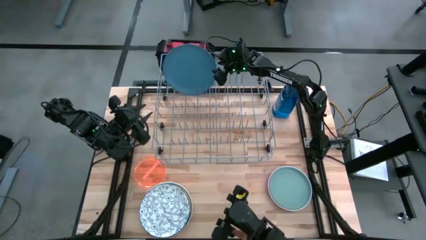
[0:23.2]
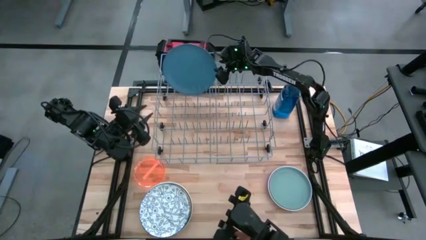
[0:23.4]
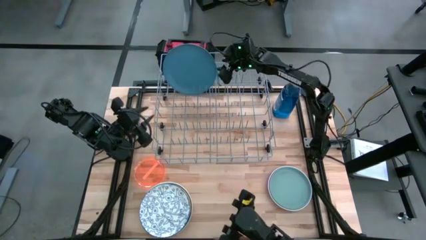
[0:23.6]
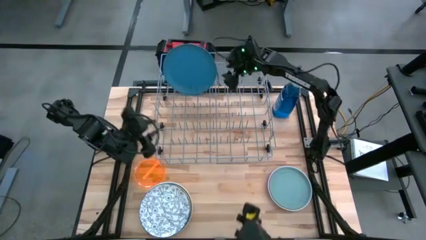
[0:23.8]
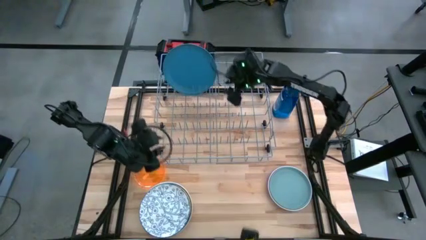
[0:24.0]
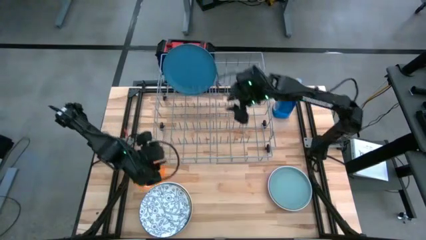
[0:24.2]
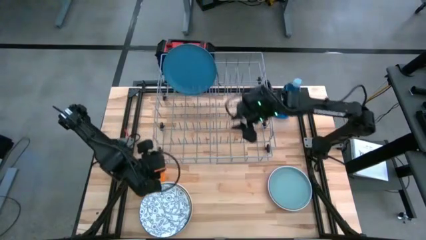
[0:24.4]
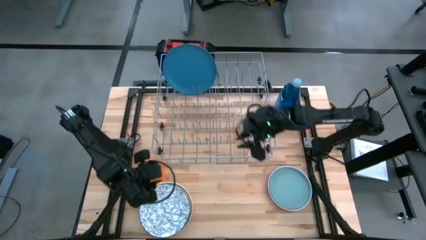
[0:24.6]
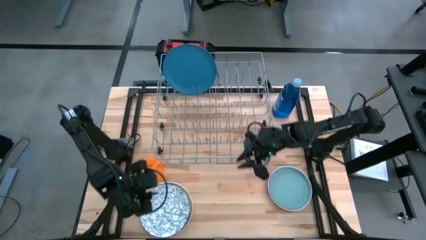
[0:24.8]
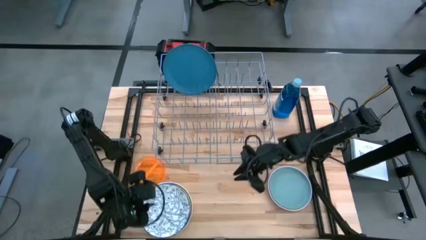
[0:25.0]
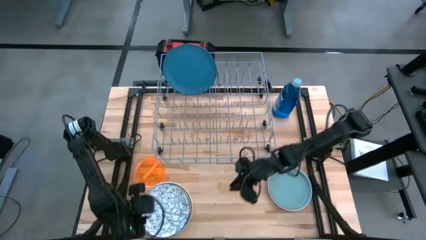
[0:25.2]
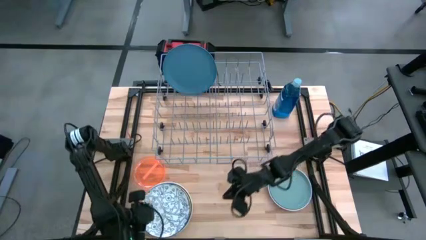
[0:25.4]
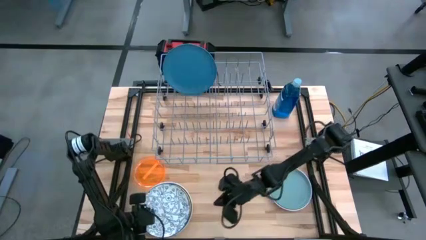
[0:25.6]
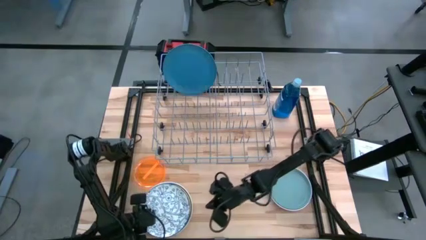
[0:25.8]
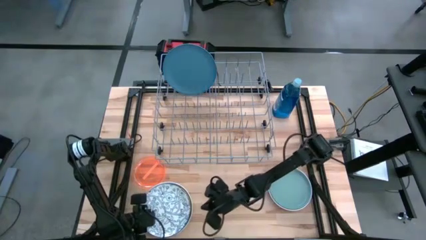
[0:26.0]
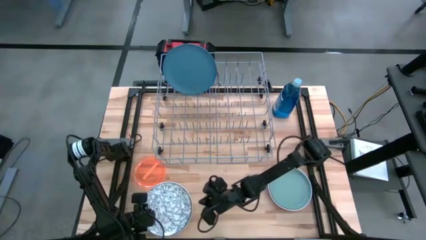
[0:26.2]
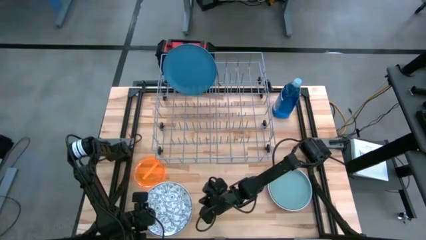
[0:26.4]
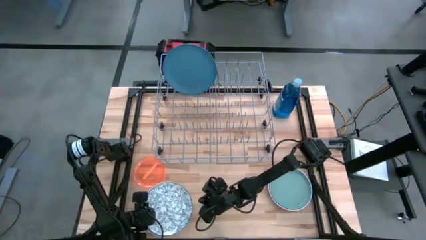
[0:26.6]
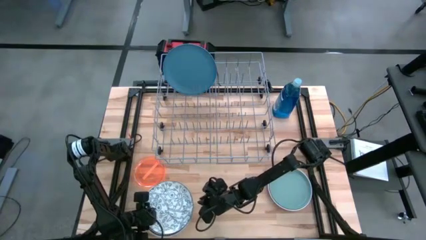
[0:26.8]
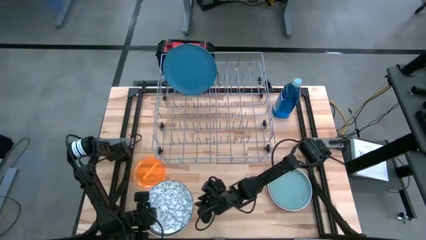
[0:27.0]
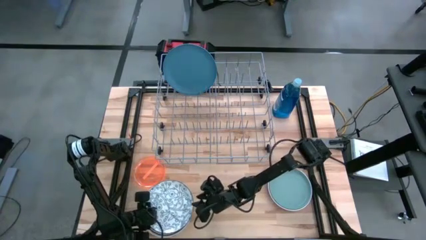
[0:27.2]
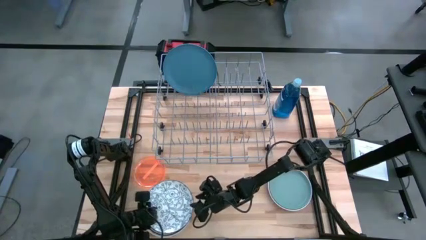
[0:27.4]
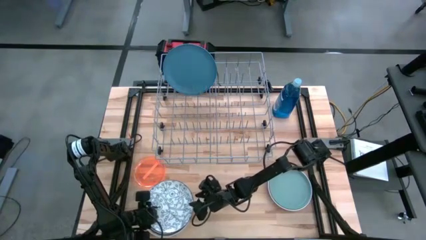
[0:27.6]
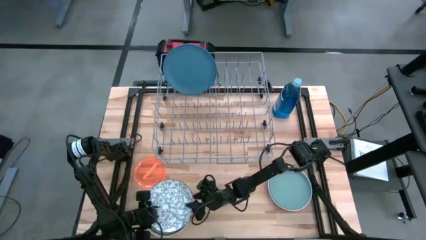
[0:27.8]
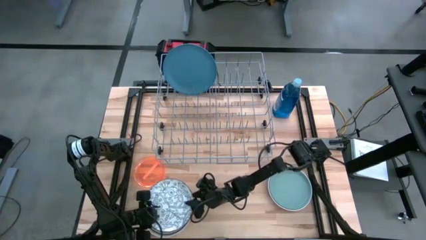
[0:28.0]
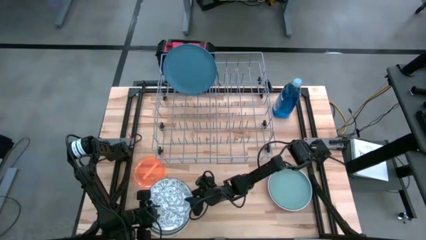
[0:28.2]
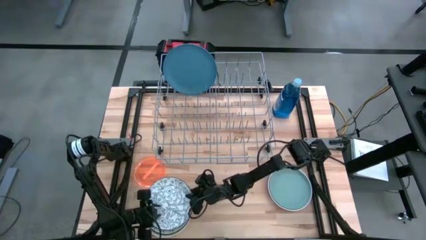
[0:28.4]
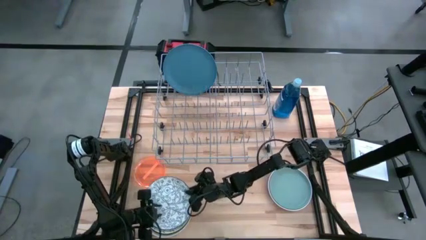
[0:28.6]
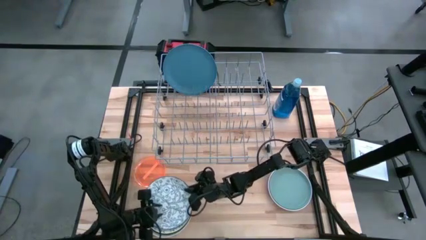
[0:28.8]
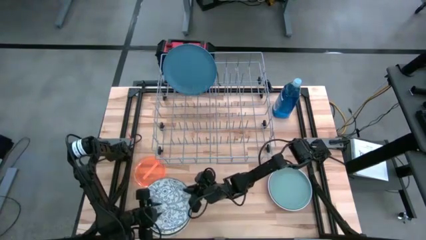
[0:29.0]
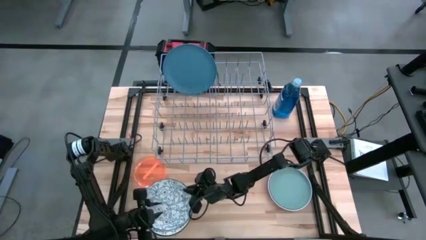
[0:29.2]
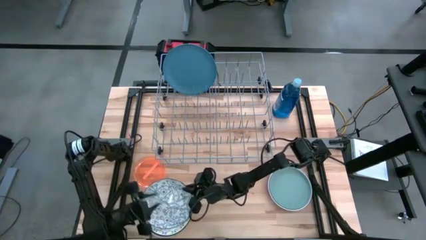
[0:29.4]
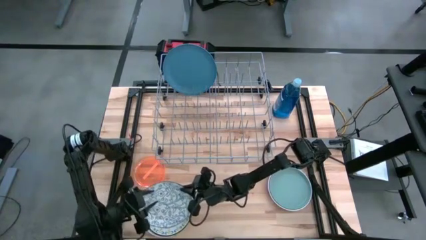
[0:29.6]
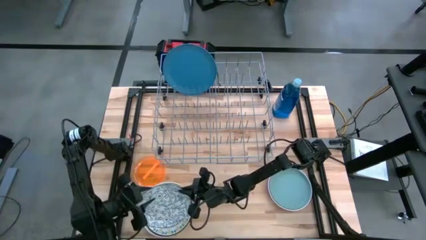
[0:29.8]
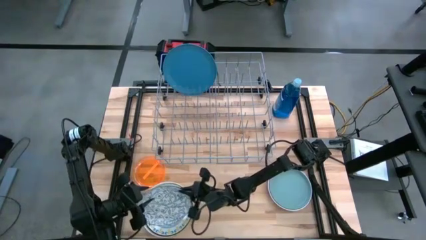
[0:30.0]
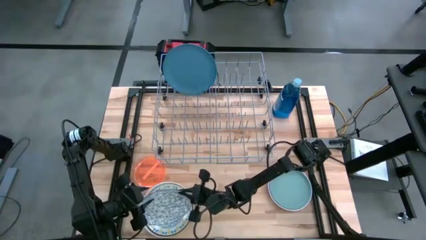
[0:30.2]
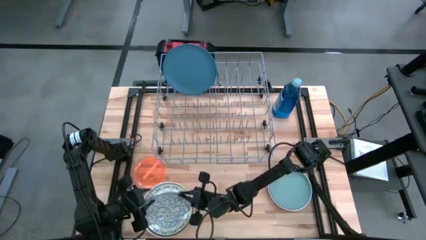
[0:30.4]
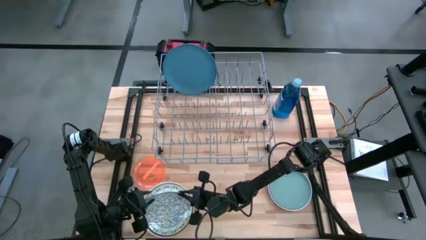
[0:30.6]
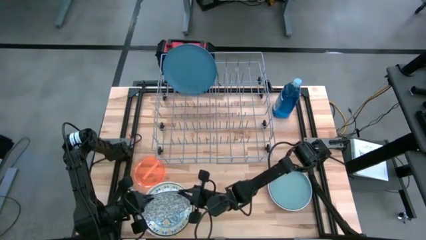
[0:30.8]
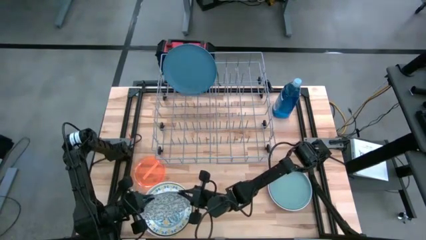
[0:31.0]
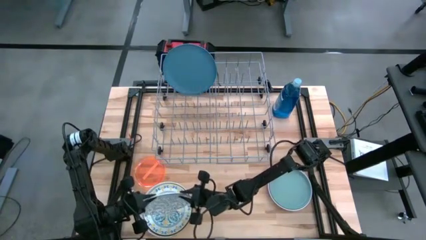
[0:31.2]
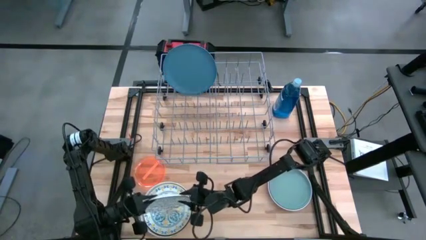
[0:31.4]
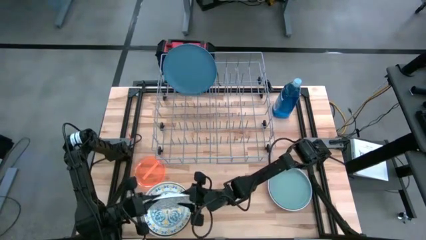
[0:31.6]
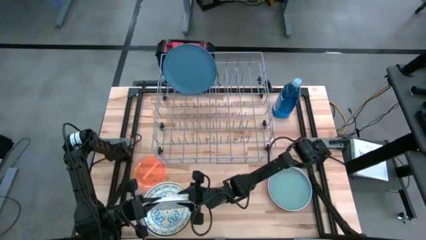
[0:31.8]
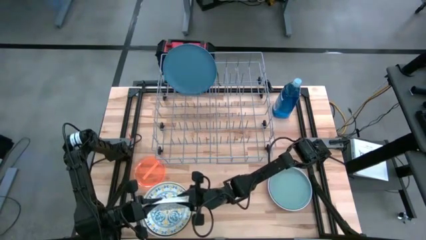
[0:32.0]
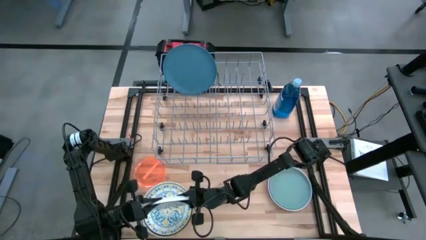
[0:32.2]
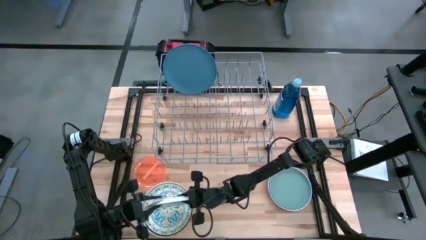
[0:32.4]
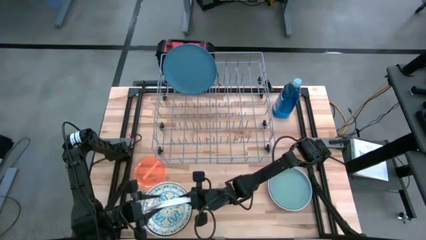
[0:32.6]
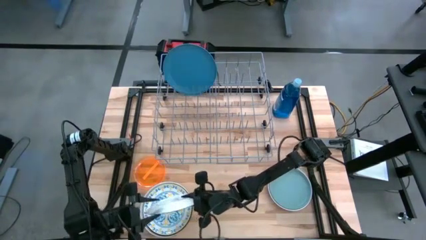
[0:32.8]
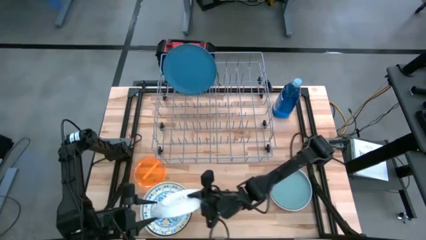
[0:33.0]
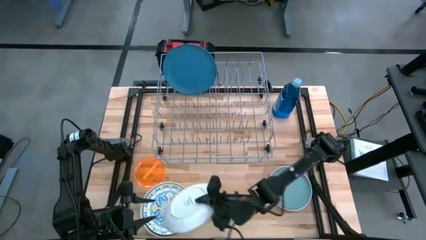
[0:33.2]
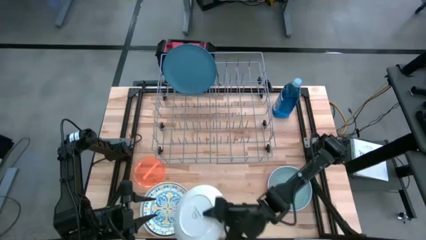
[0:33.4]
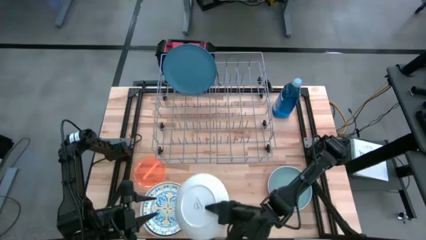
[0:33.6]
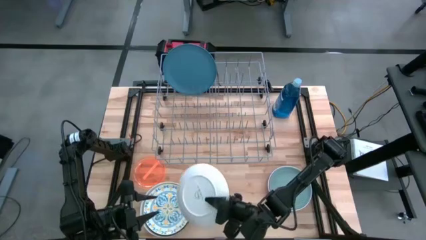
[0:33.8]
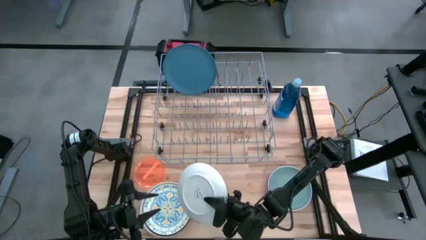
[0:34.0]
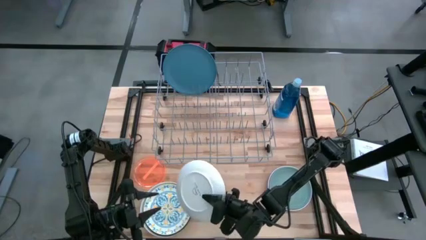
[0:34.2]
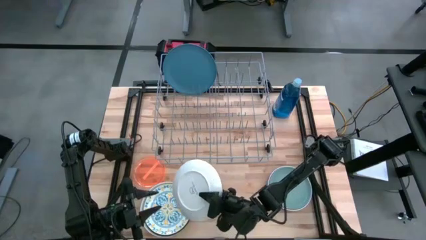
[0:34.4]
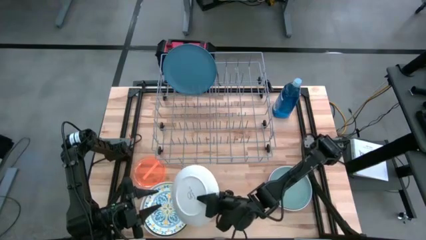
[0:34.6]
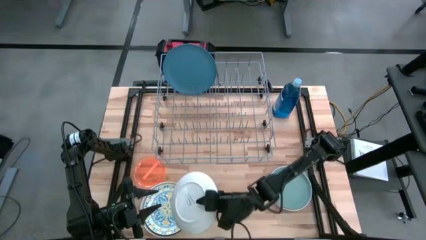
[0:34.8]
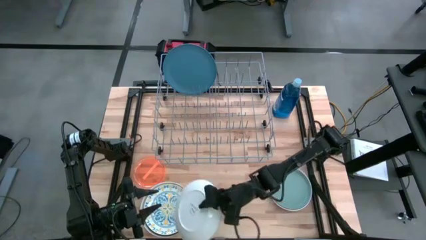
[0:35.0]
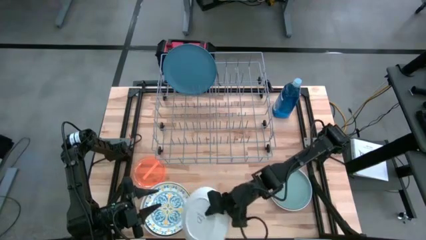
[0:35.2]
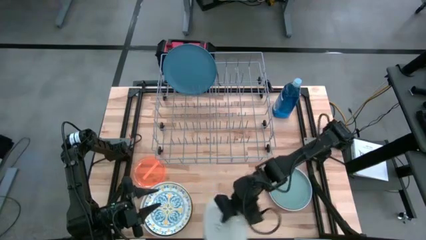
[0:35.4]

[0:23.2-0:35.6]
Task: Sort dishes
Put the white patterned plate in the dish rack
